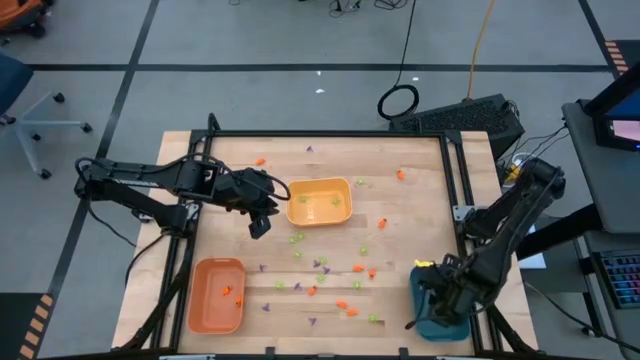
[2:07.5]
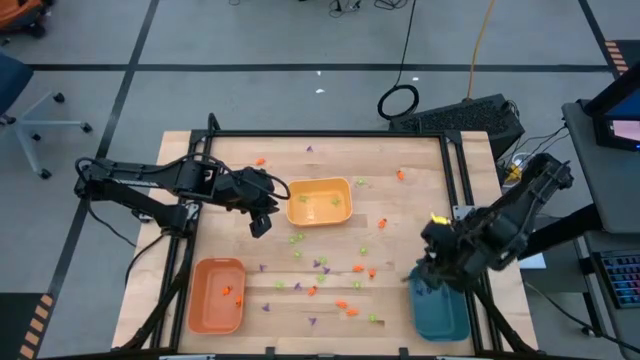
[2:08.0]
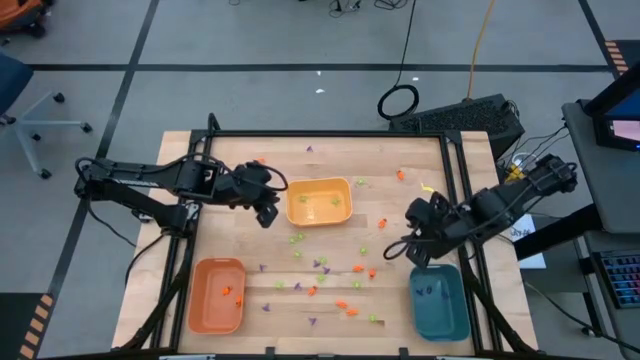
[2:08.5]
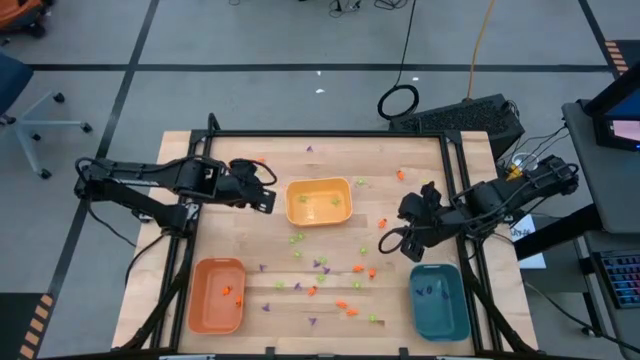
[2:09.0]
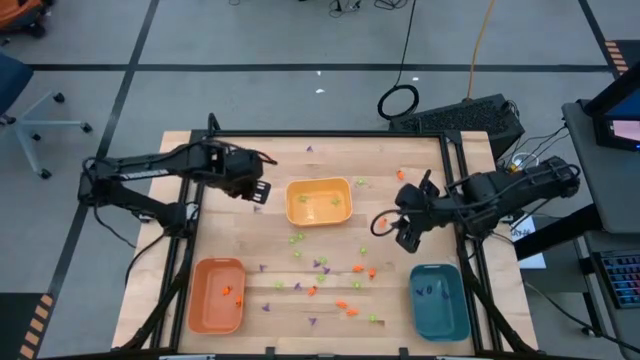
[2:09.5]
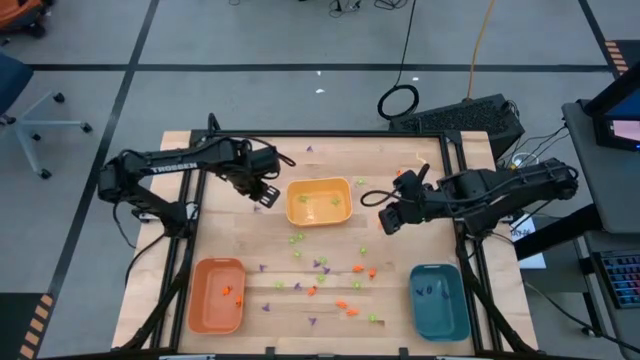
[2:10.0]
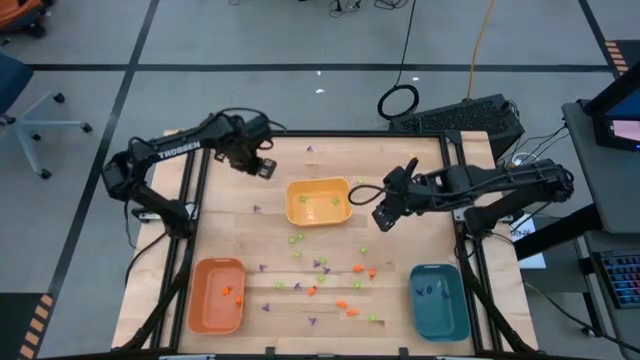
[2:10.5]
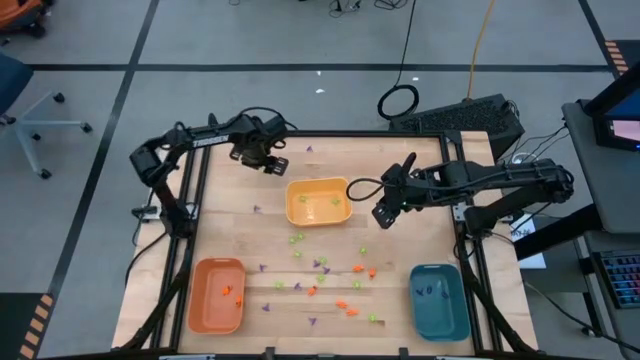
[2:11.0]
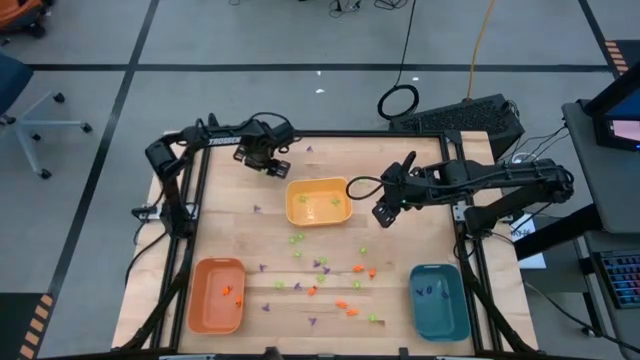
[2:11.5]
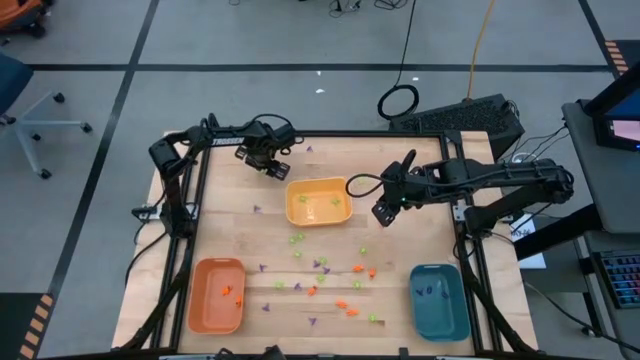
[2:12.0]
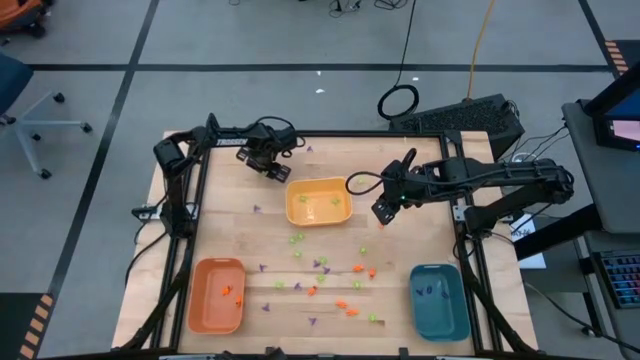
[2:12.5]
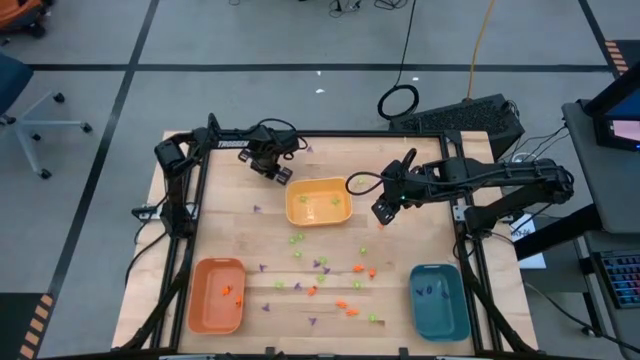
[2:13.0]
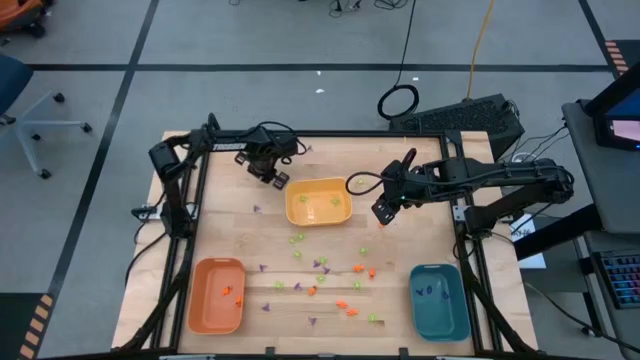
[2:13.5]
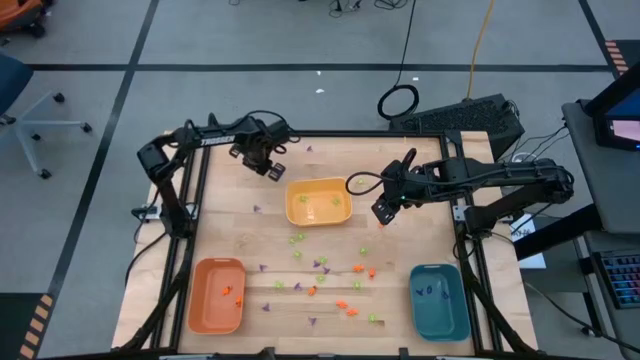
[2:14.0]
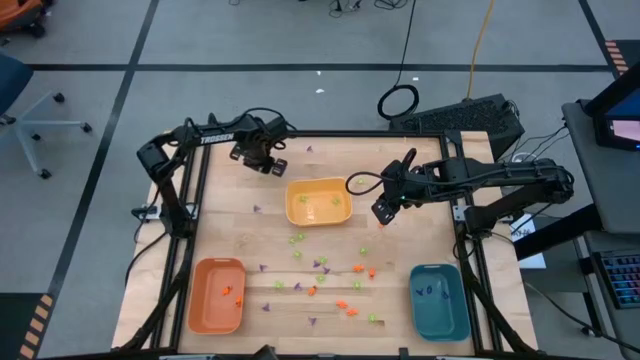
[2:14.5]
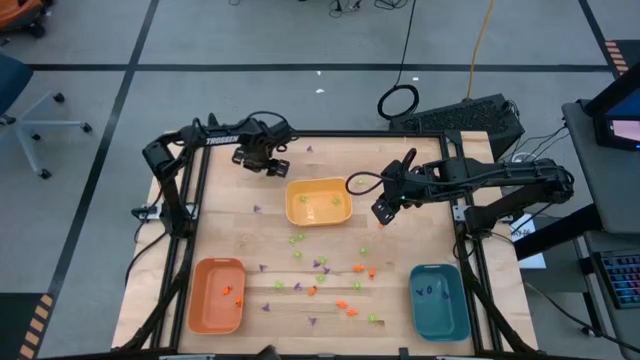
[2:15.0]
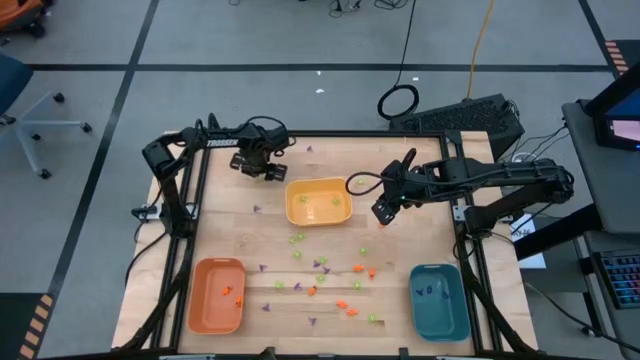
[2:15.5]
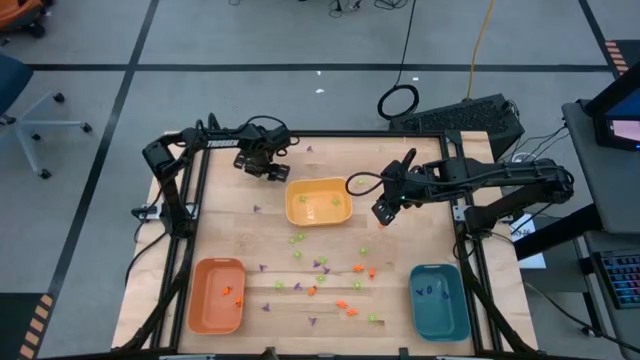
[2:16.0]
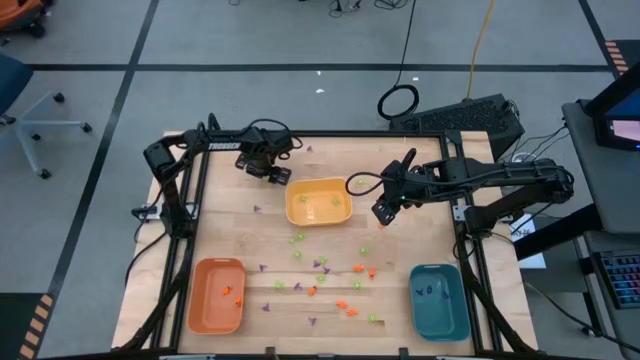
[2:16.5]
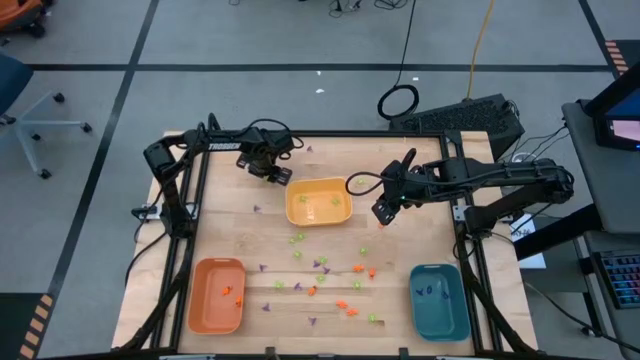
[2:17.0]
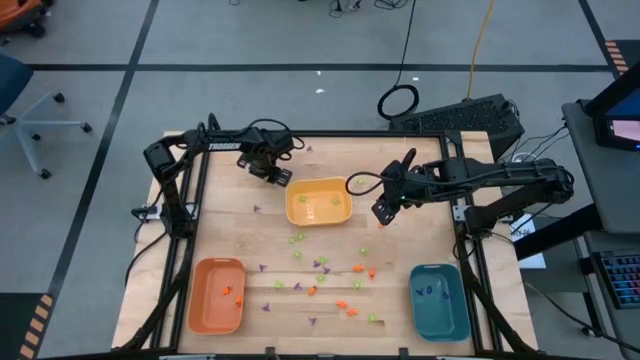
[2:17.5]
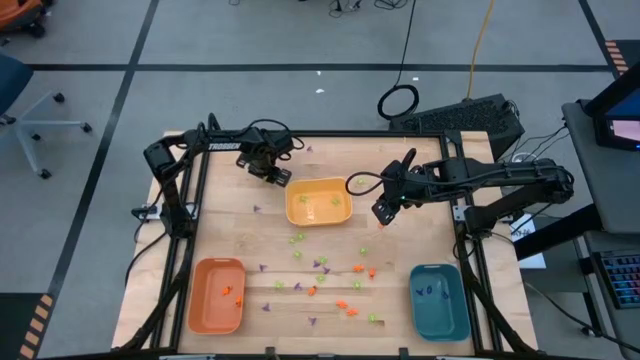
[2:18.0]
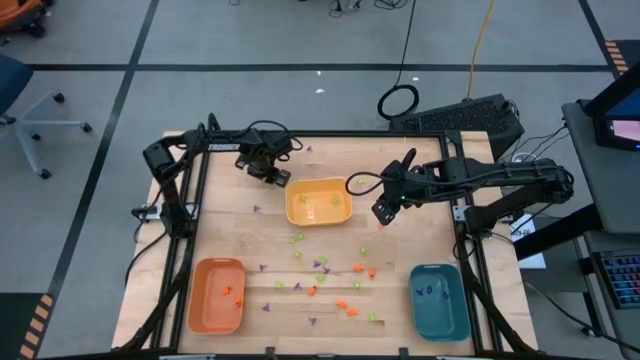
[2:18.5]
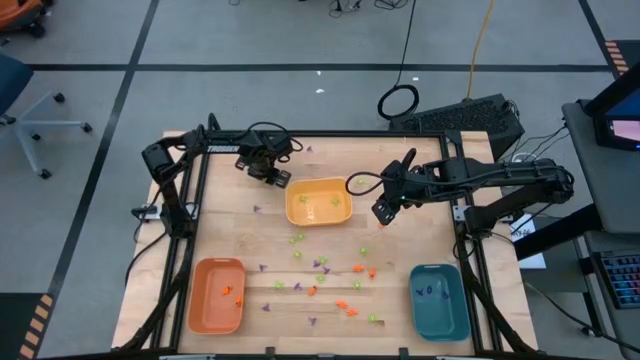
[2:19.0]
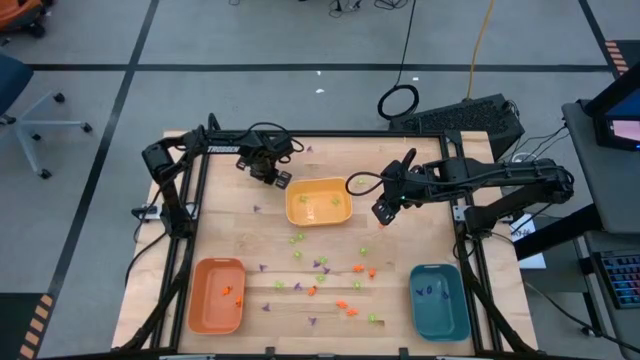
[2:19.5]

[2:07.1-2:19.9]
Task: Sort Halloween decoration
Put the green spider toy into the yellow bin

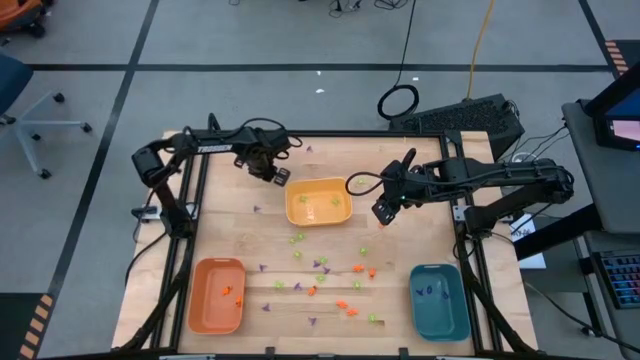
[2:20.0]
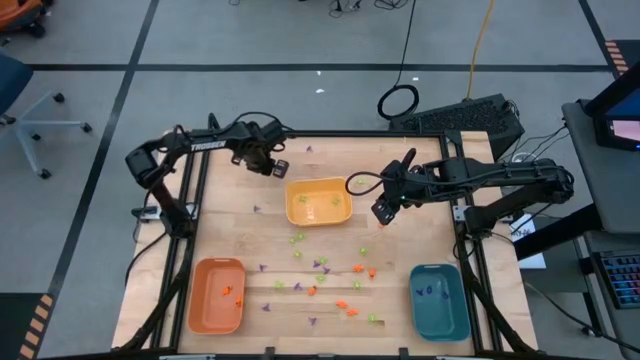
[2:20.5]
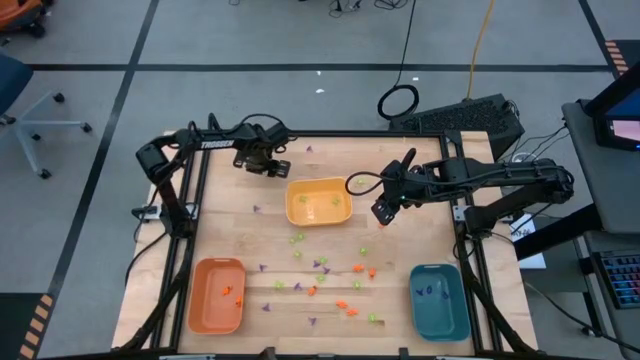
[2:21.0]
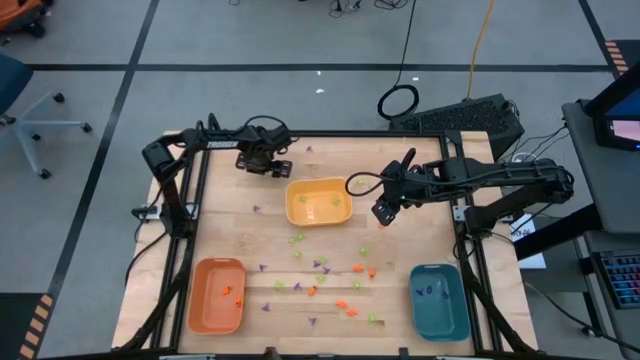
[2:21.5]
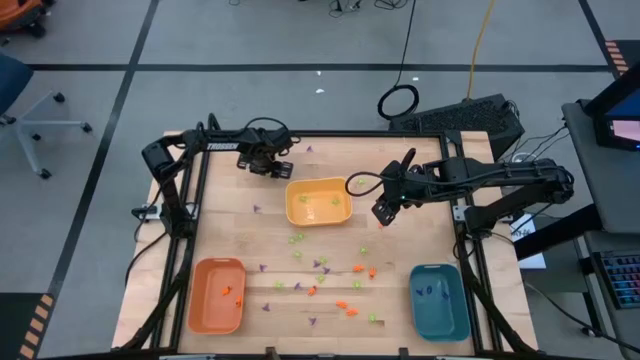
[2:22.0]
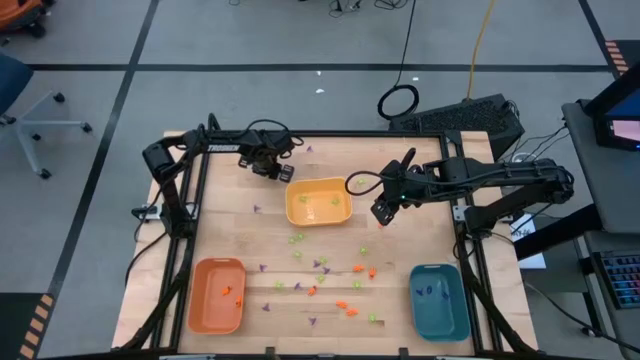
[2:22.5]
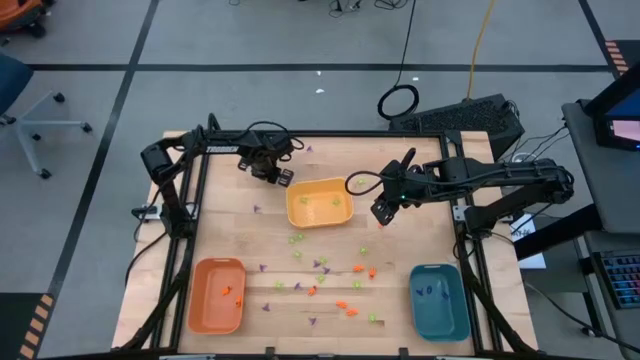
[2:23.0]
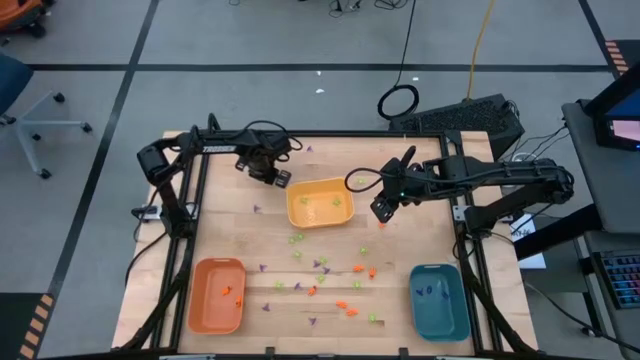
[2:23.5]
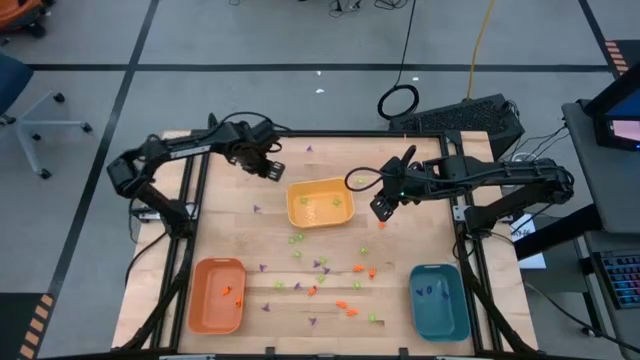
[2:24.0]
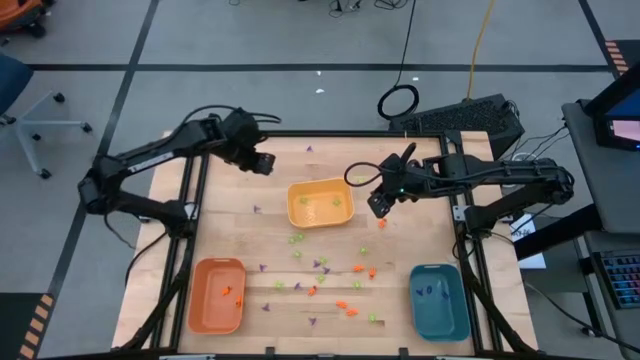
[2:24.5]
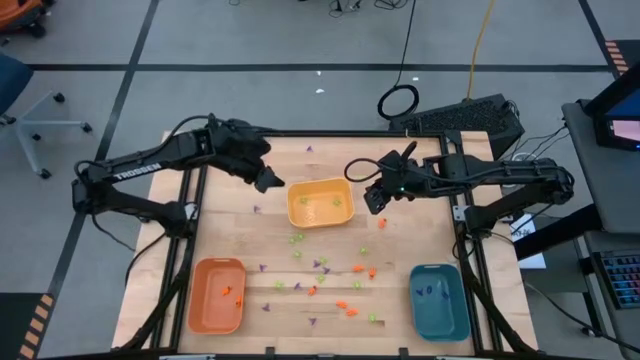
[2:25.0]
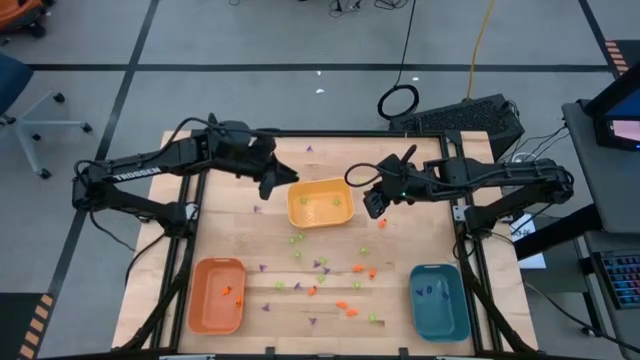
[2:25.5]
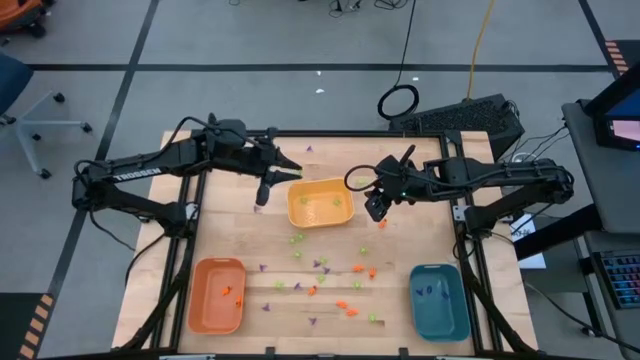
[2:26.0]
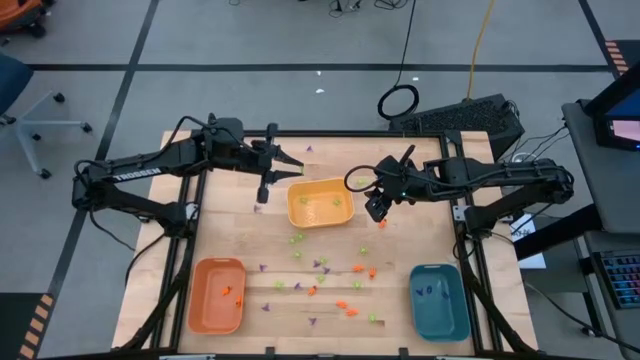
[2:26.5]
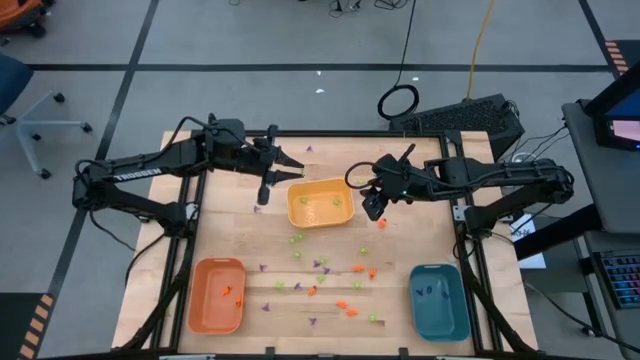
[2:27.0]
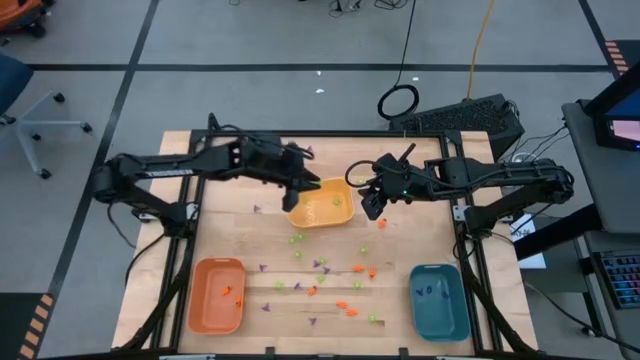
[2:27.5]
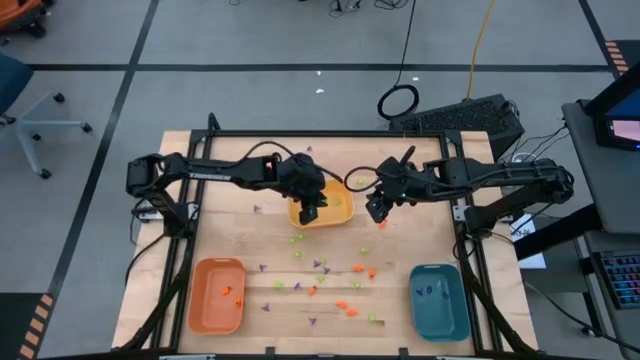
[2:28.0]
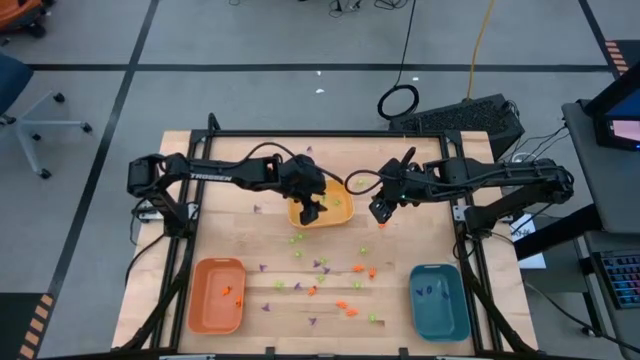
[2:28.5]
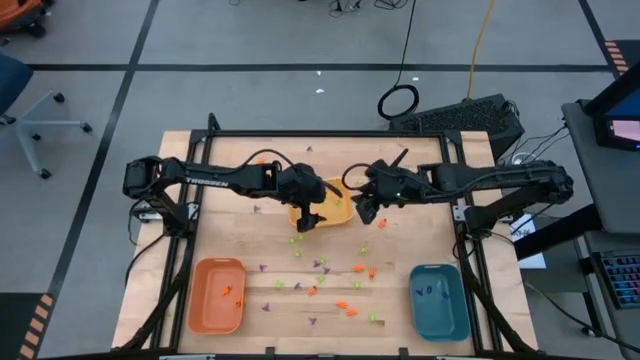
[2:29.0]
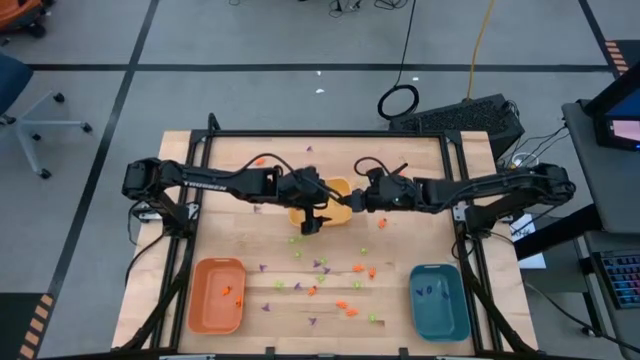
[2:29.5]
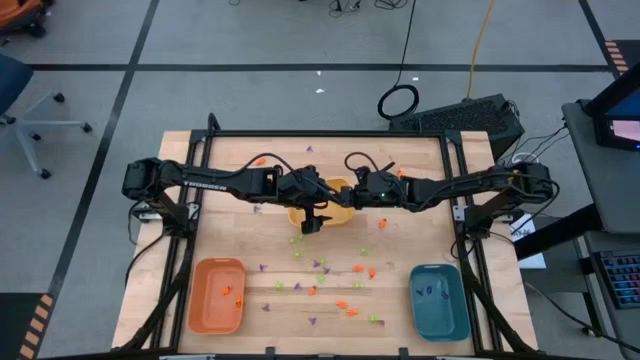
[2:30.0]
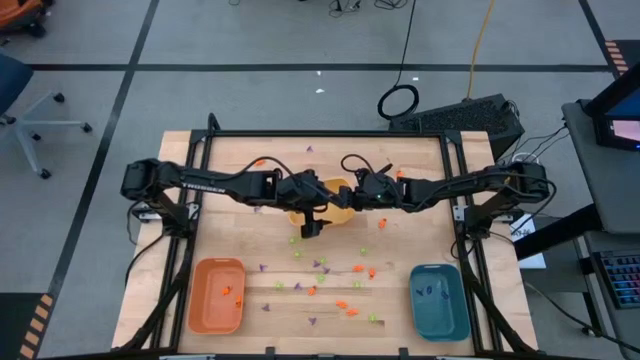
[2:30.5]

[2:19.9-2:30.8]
Put the green spider toy into the yellow bin
